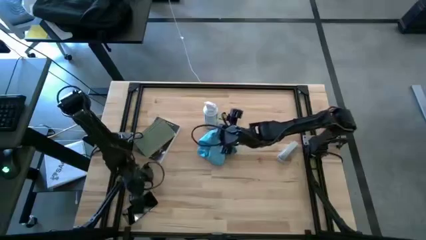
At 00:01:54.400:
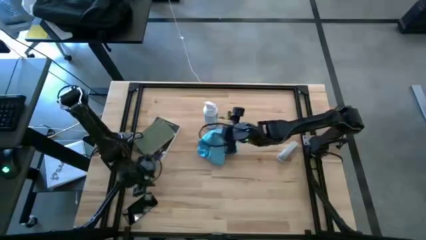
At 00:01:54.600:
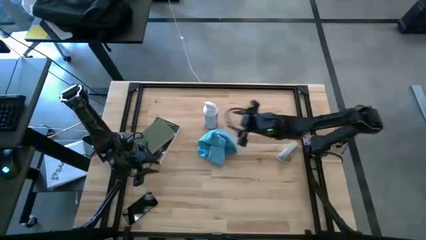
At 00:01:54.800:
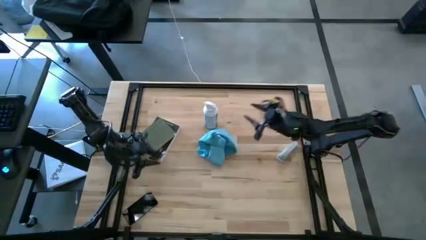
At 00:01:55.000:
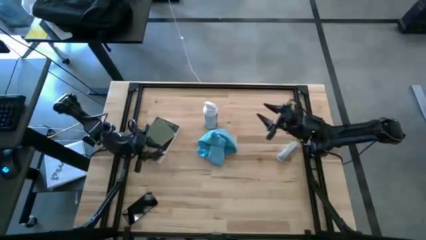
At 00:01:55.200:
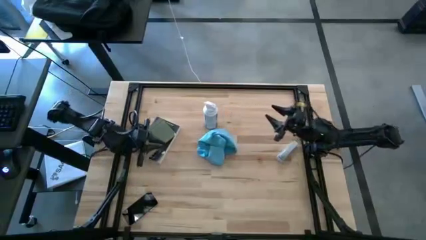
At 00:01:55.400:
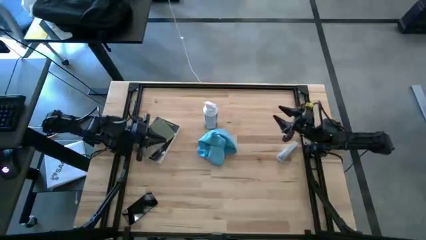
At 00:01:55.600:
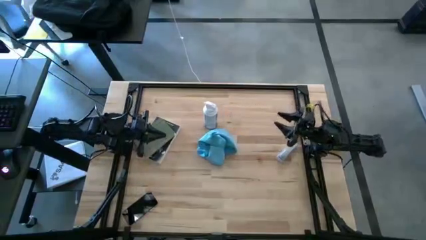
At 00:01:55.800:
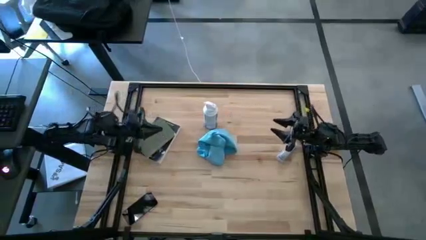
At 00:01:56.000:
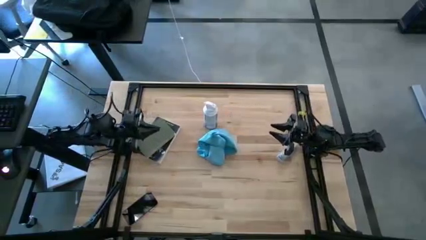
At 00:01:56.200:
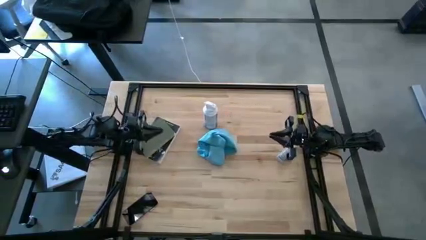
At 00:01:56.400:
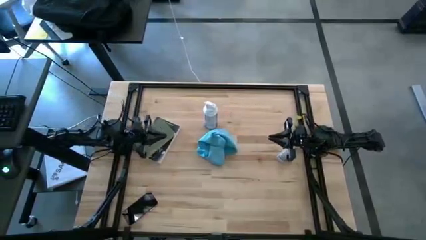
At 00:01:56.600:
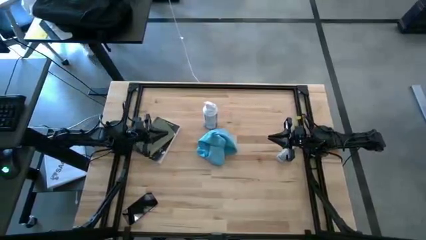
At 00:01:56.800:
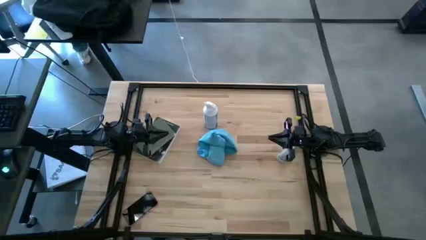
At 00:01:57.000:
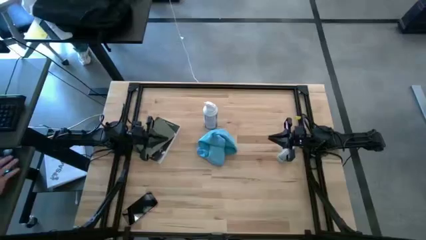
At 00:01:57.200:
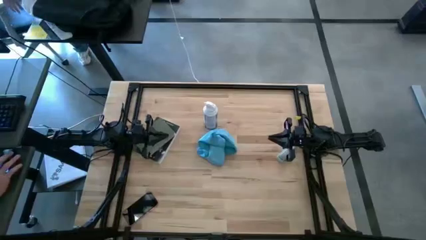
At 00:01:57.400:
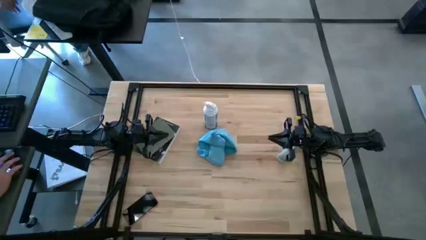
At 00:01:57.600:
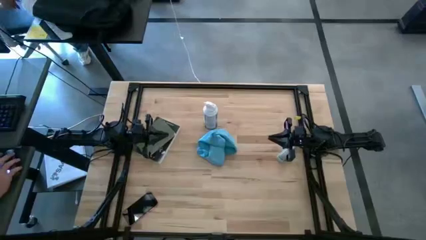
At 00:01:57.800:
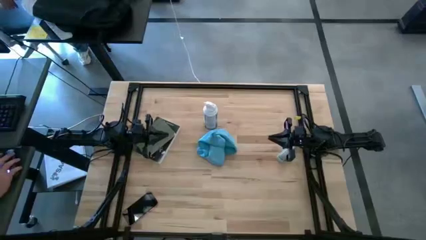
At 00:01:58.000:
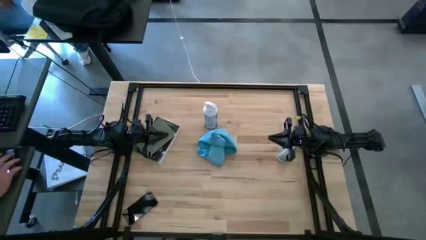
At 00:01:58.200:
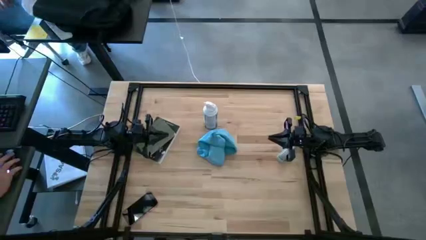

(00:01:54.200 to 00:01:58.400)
Task: Apply microfiber cloth
Return to Home Position

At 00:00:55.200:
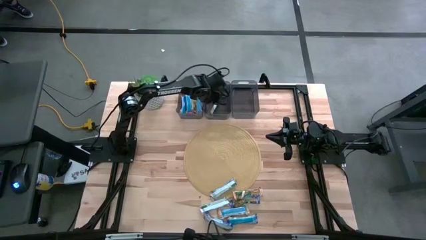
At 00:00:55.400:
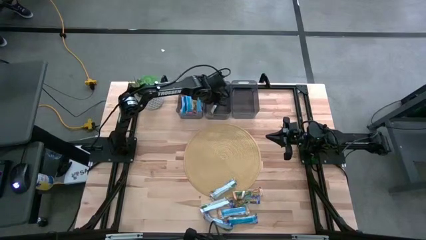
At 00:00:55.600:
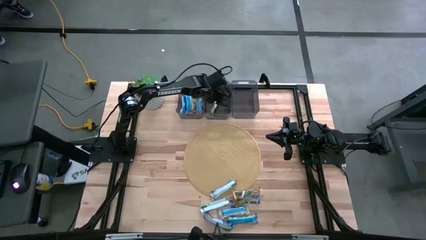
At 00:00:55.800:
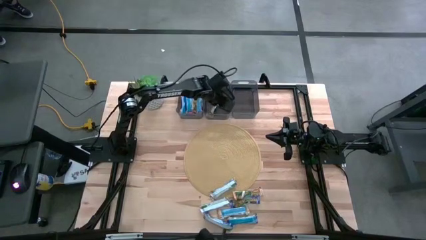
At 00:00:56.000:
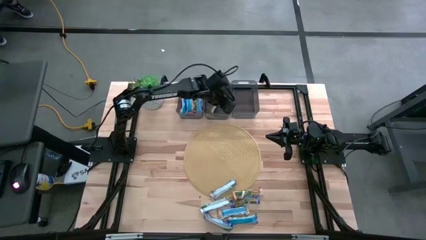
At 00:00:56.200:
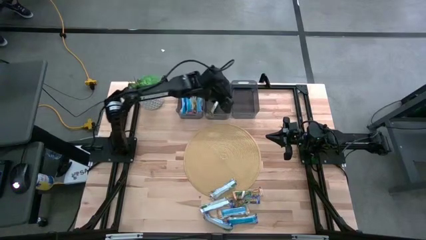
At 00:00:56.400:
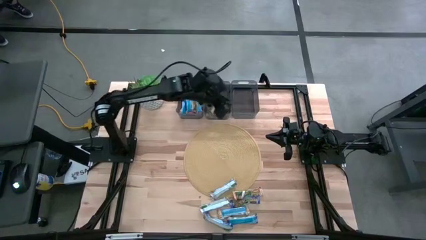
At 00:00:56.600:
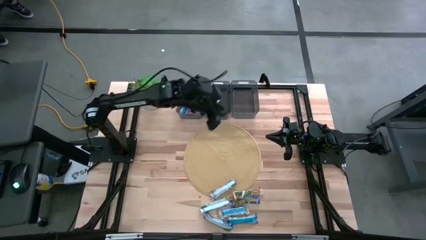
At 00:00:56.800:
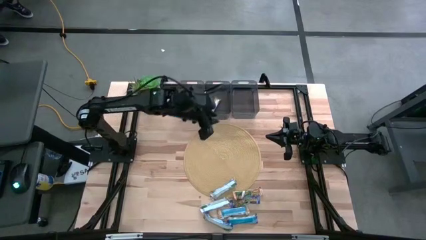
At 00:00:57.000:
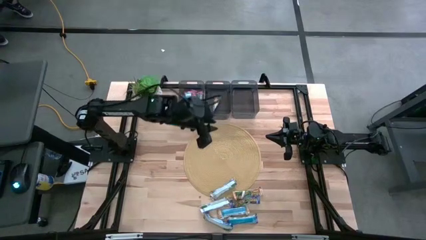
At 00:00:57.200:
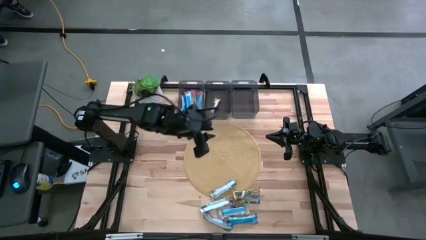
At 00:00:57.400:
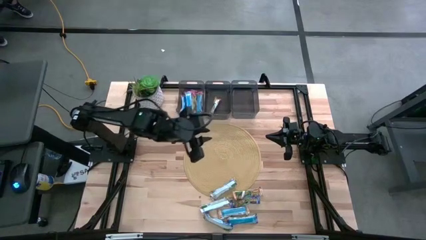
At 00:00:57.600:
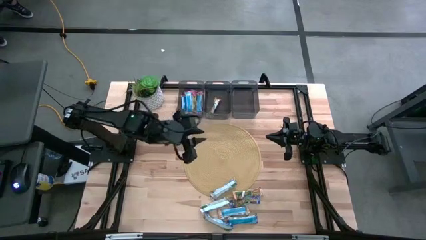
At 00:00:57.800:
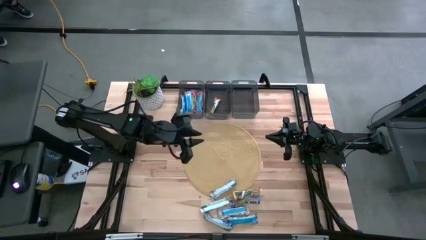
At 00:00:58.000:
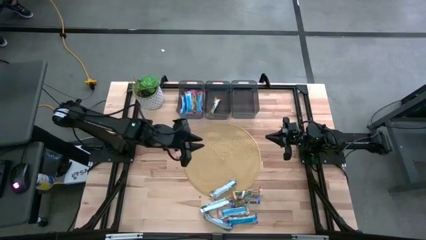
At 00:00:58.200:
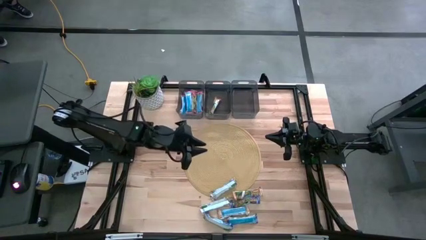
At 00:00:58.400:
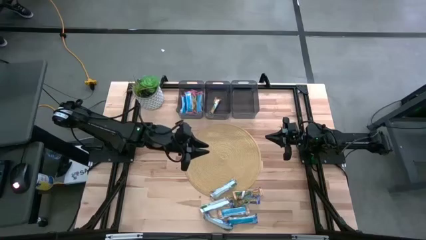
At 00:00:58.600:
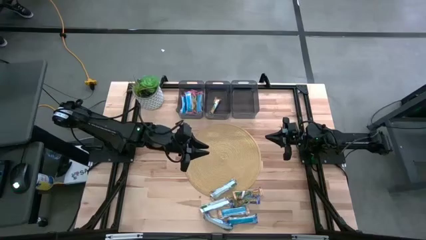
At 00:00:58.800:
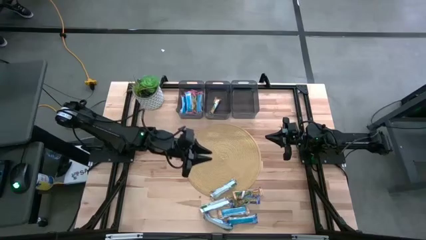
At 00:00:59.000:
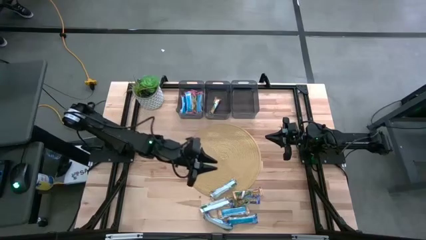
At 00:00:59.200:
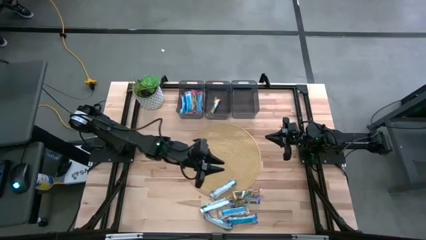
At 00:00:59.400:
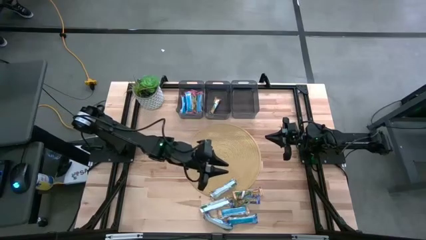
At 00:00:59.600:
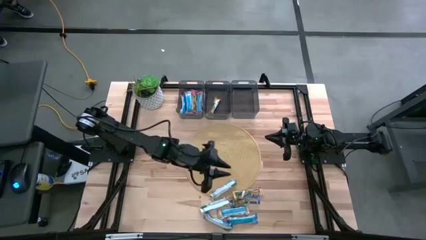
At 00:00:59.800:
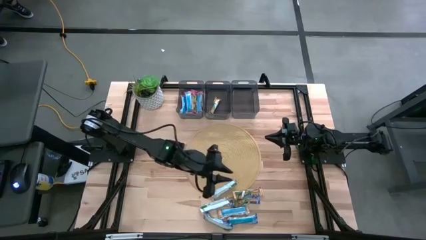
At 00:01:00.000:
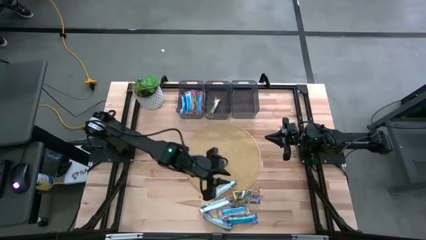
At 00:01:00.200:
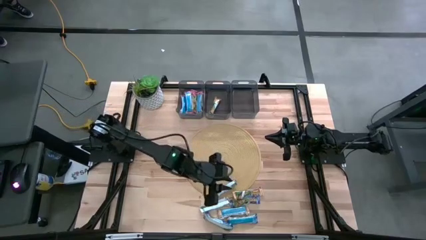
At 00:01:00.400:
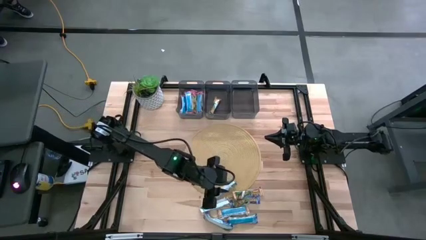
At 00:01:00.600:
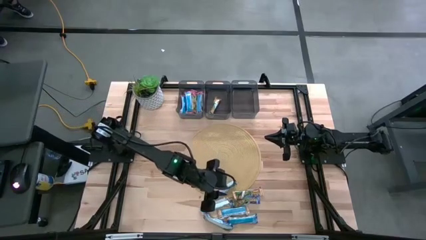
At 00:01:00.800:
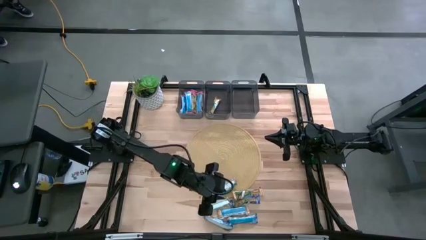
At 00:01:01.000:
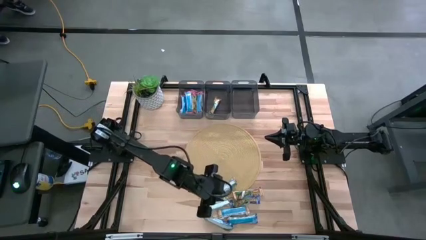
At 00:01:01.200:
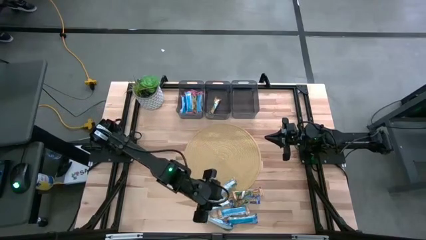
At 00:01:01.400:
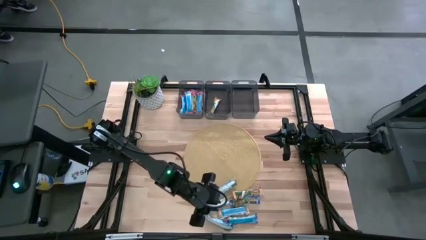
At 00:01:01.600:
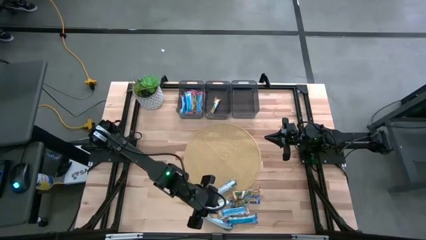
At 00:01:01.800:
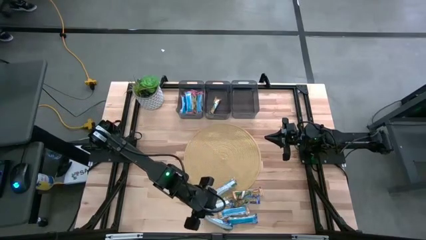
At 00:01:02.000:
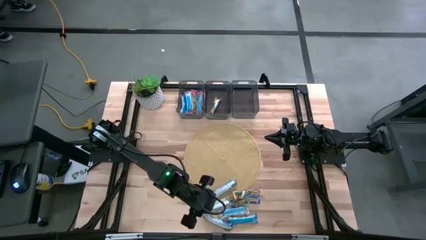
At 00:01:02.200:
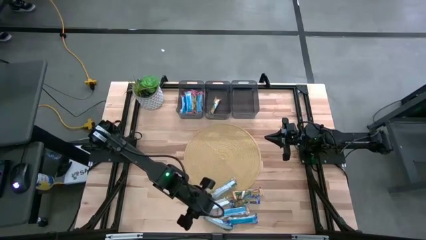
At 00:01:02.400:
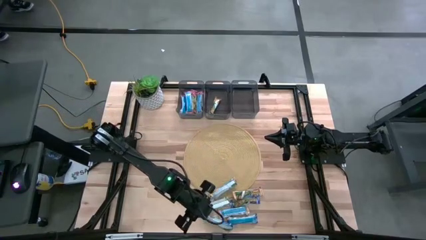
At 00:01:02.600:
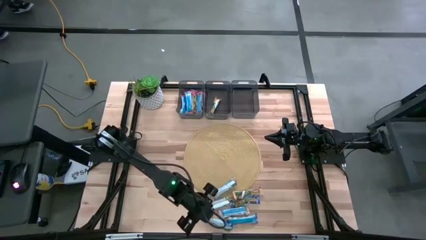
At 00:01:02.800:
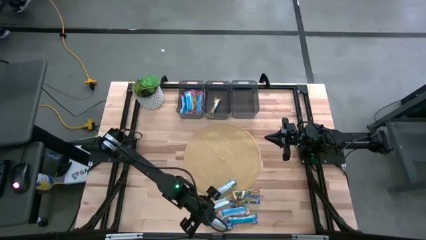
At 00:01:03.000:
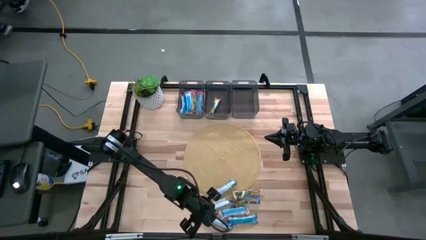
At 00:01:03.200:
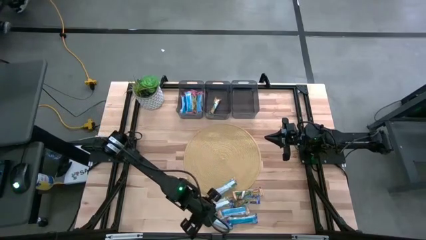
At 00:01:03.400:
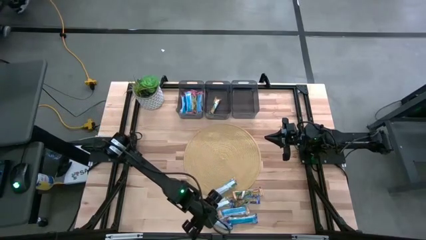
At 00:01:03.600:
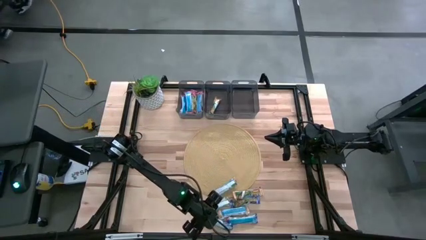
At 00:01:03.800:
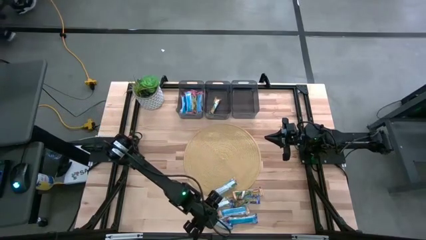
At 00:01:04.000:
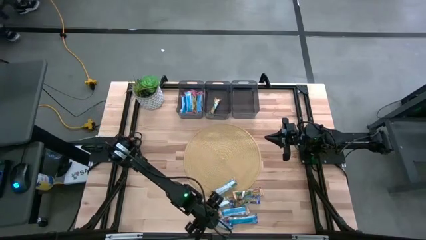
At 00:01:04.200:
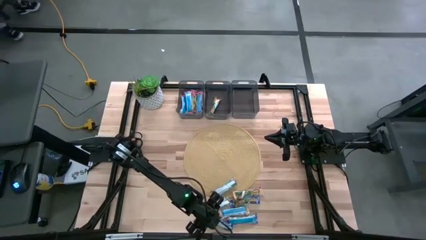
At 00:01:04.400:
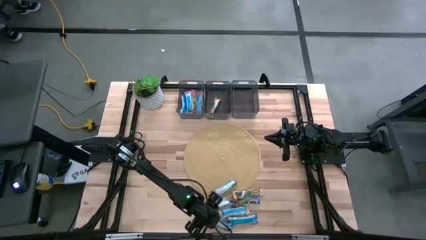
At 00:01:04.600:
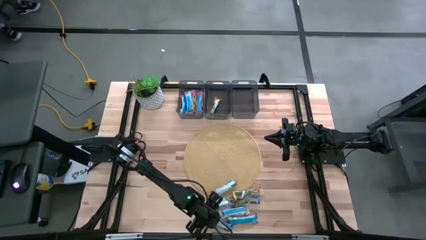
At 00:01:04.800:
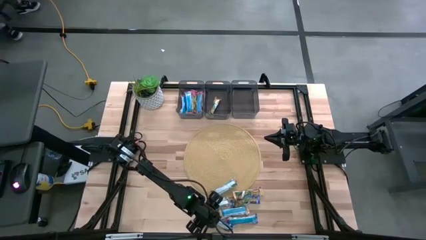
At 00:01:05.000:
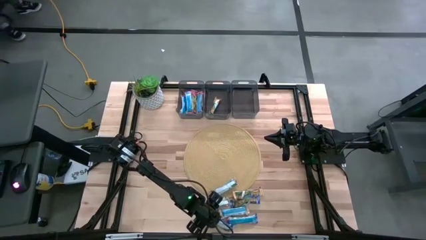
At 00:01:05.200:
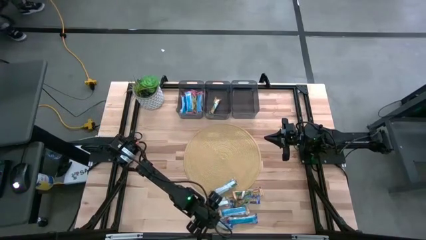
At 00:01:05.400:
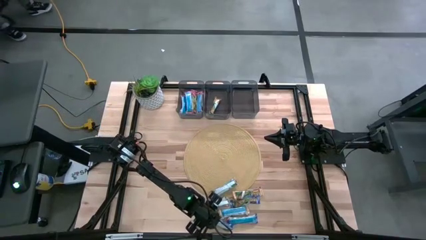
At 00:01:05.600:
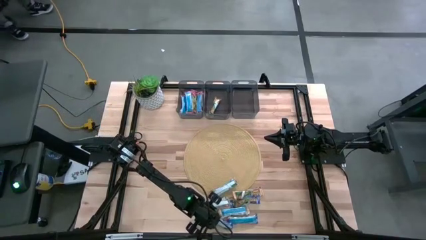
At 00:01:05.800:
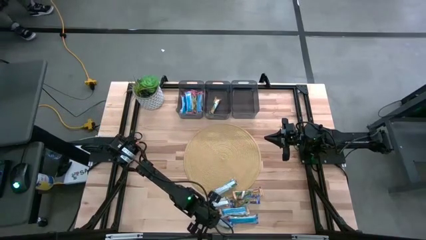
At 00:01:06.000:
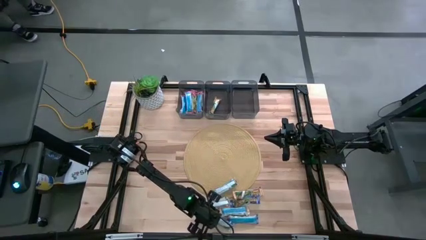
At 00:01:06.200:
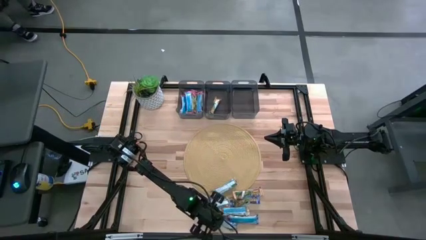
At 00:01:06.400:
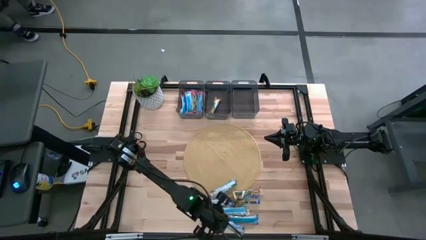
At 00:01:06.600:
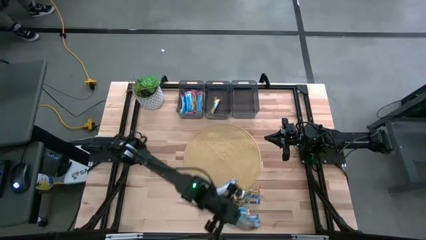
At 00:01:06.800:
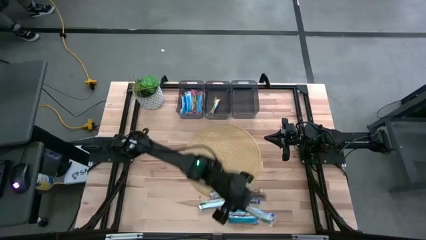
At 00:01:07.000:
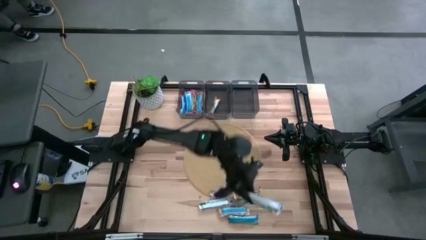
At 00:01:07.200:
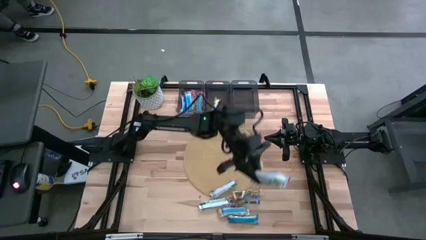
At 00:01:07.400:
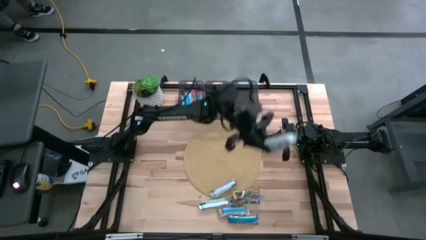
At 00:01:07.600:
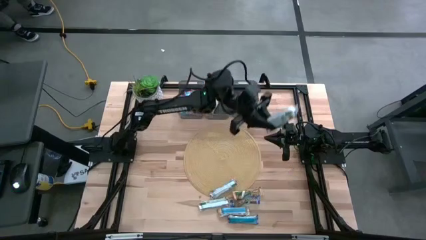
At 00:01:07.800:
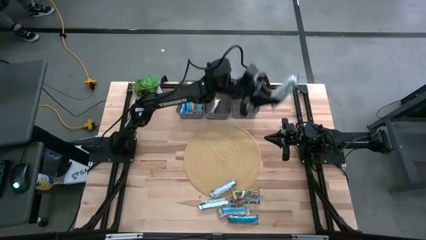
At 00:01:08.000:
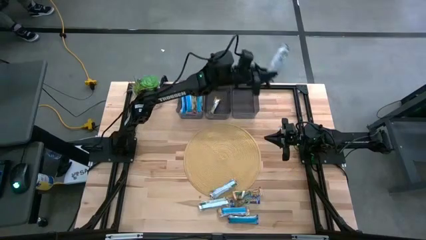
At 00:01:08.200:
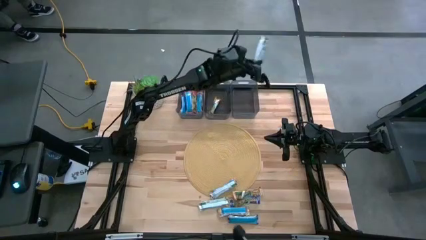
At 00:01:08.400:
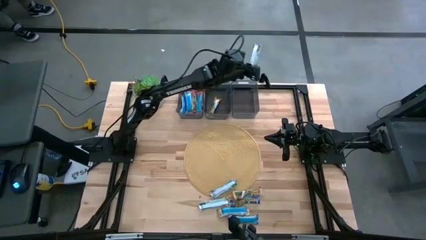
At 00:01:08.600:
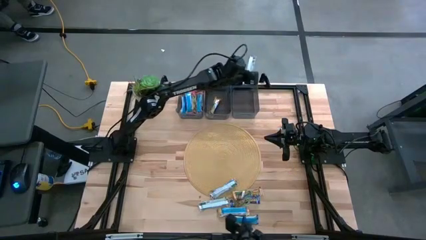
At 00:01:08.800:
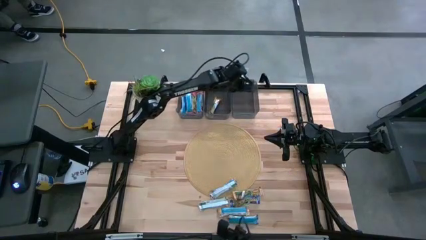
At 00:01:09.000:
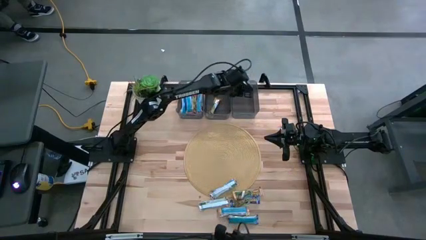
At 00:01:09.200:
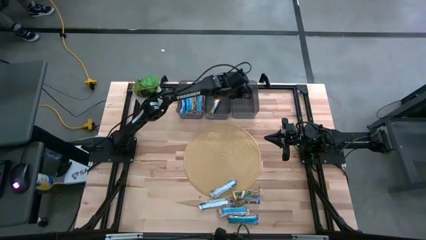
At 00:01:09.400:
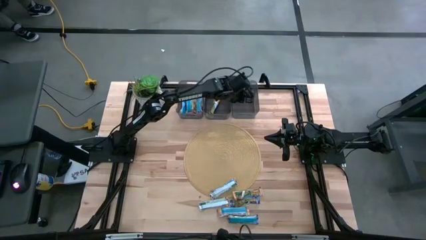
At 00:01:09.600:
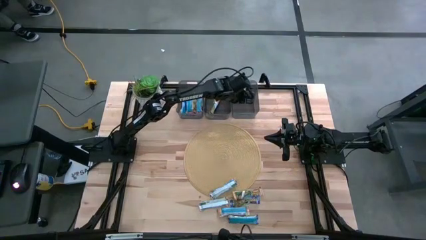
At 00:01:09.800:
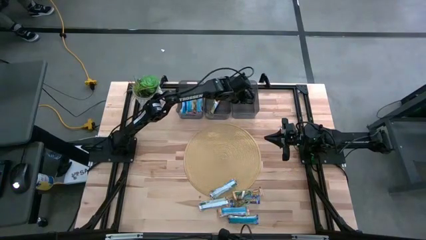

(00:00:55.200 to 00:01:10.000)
Task: Pick and place Granola Bars by type
Put the blue granola bar into the right black bin
